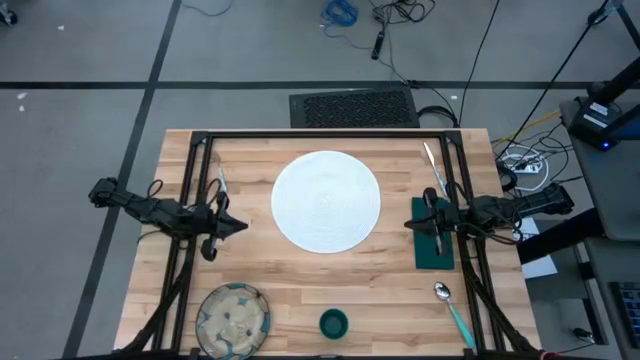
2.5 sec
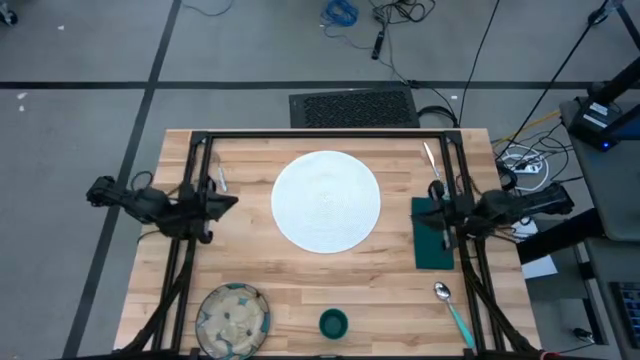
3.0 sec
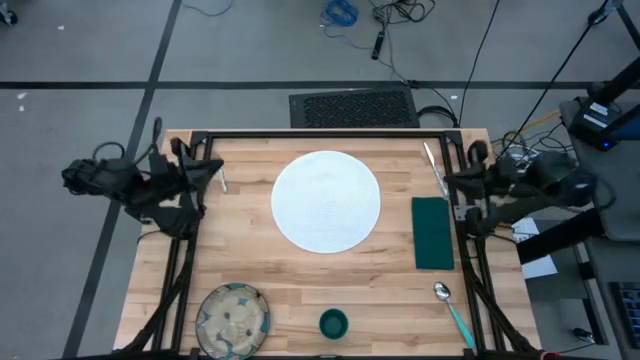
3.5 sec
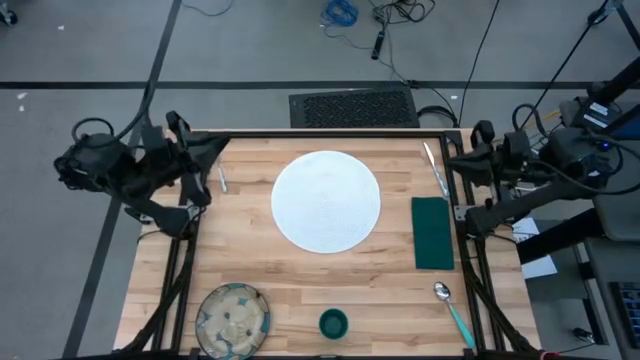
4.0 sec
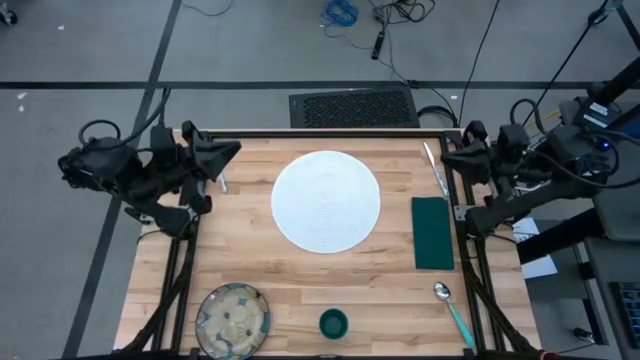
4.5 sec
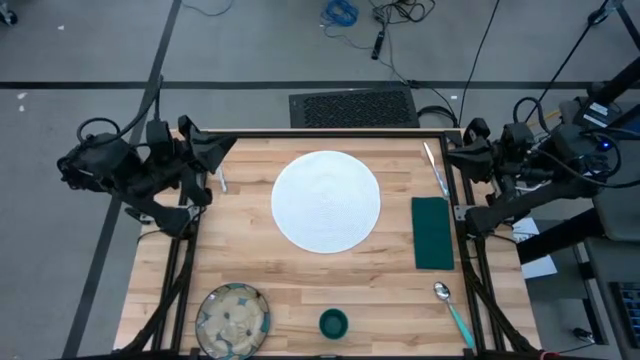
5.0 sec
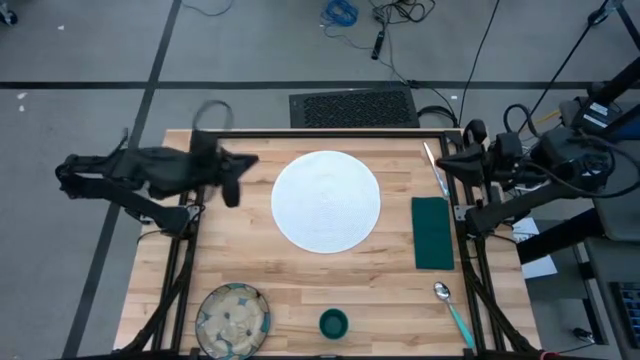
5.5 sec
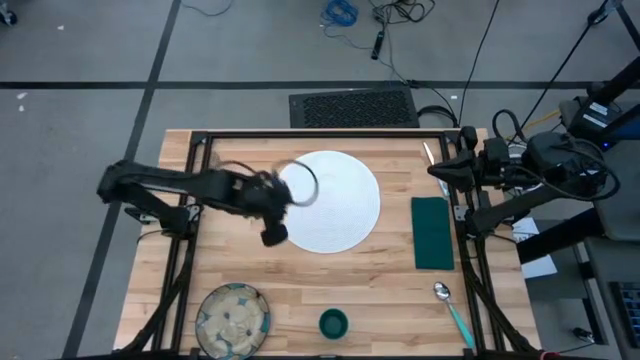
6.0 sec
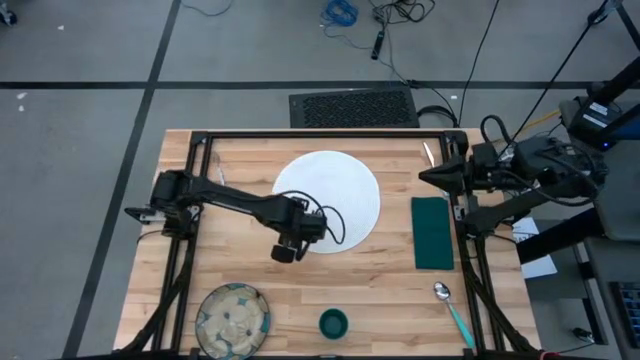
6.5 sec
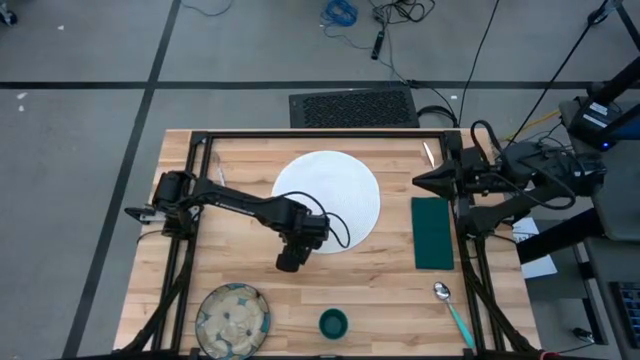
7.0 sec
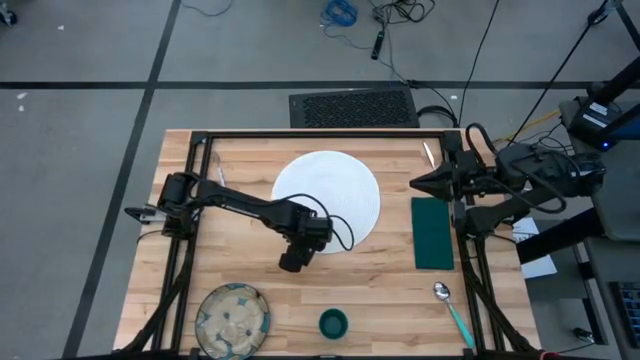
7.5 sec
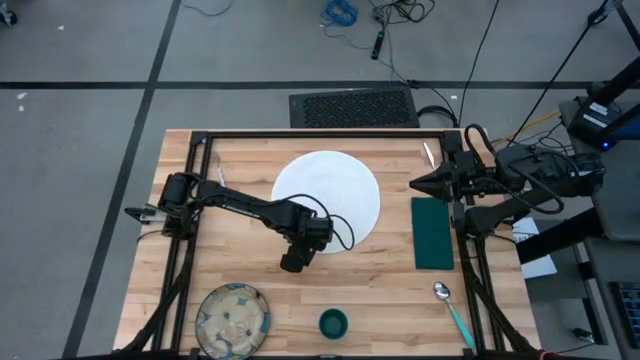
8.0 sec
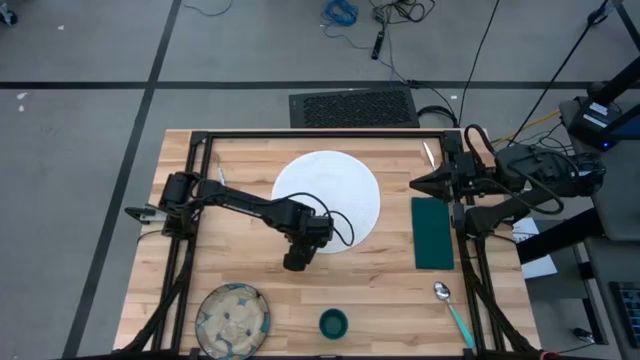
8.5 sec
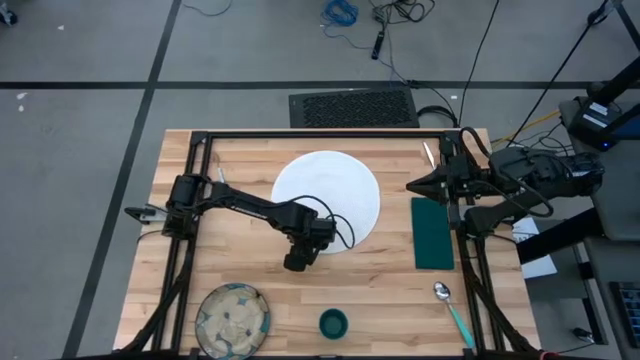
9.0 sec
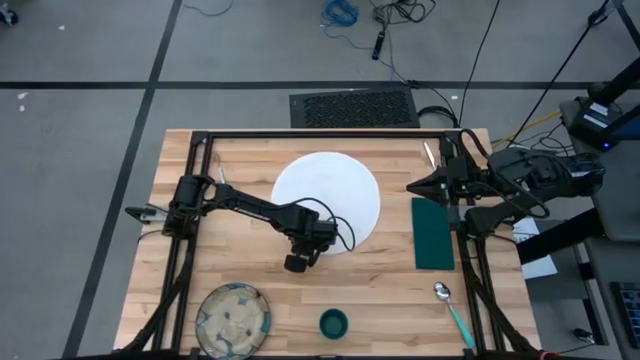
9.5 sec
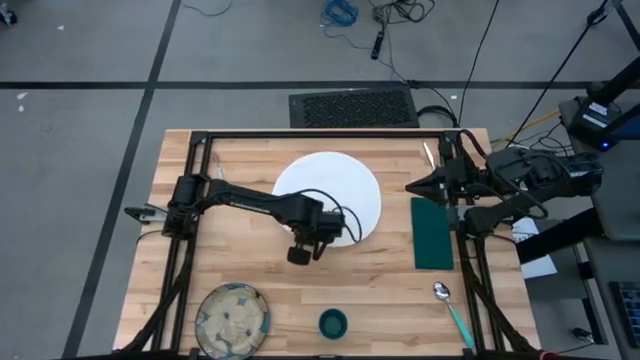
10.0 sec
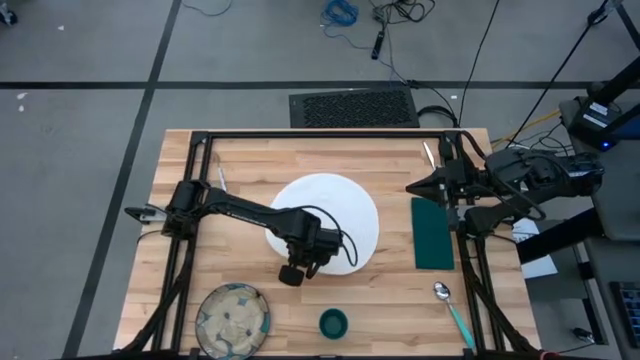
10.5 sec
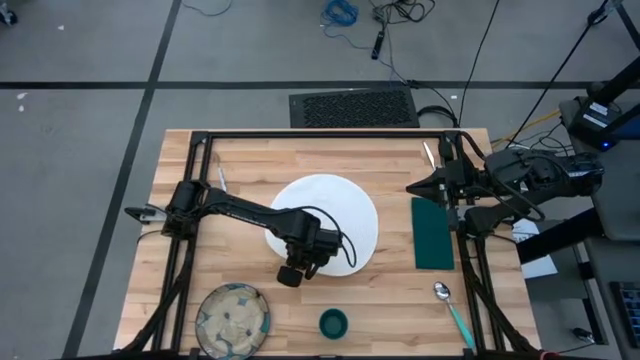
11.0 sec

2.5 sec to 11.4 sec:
Task: Set table place
Move the white placemat to the center

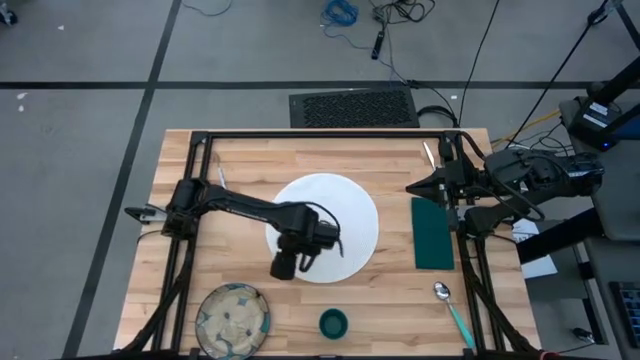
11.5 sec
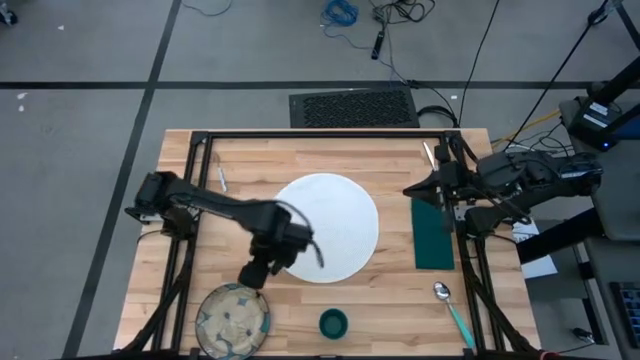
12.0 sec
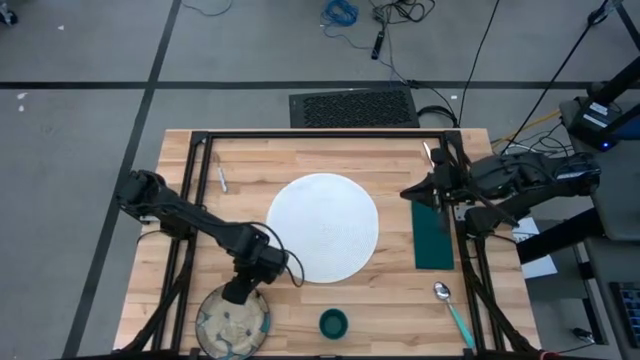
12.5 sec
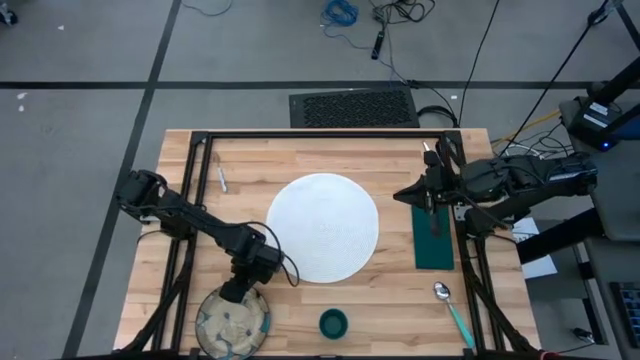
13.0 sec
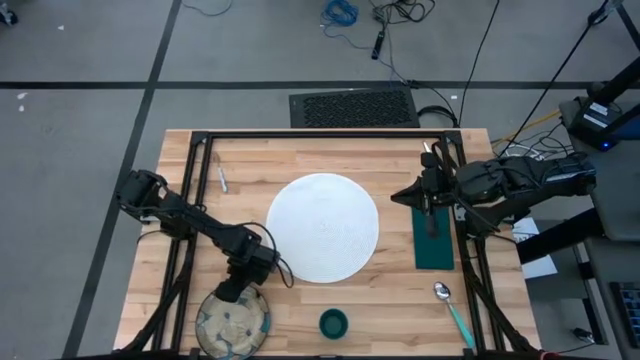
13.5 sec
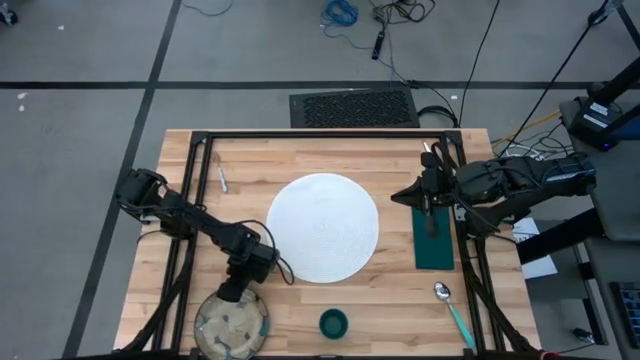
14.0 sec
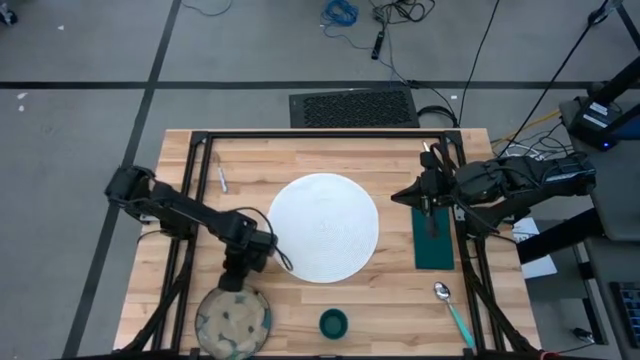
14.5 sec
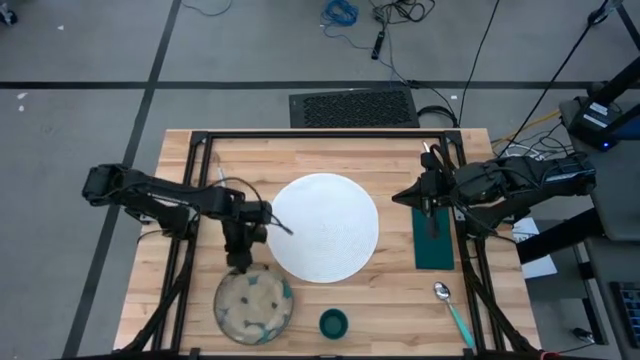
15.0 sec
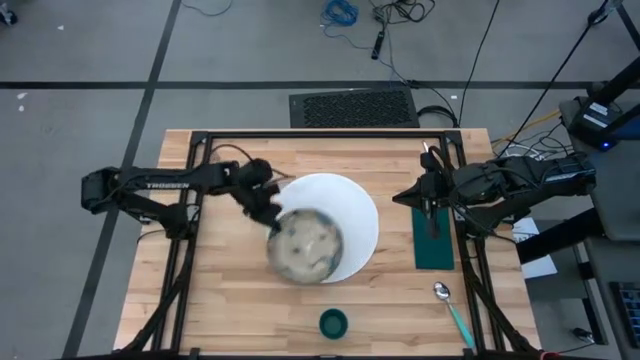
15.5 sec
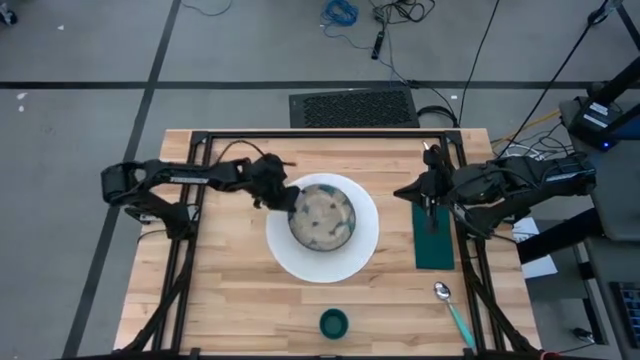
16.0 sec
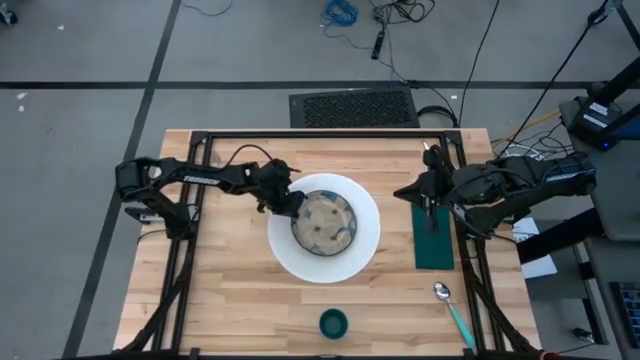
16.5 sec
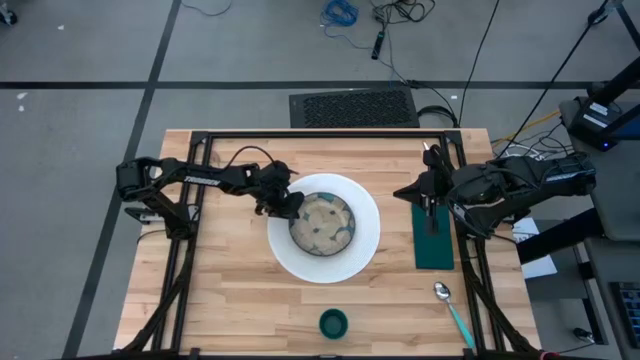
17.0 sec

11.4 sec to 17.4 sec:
Put the brown plate on the white placemat

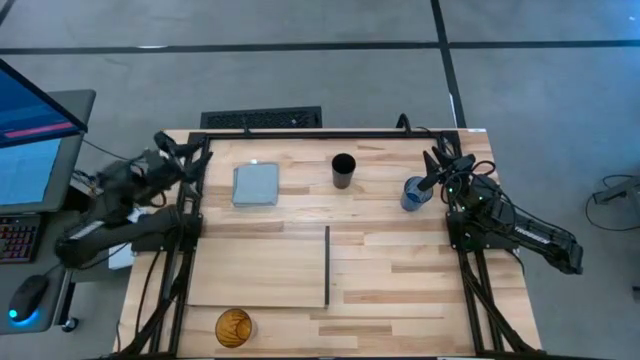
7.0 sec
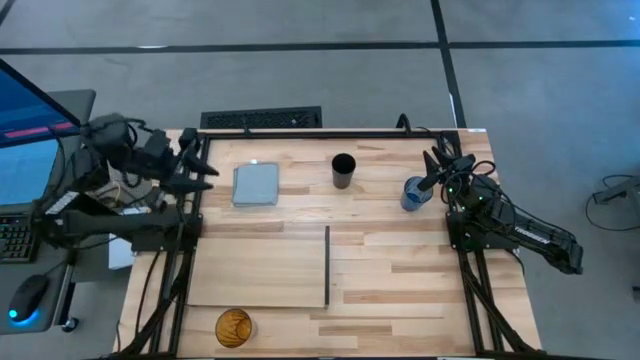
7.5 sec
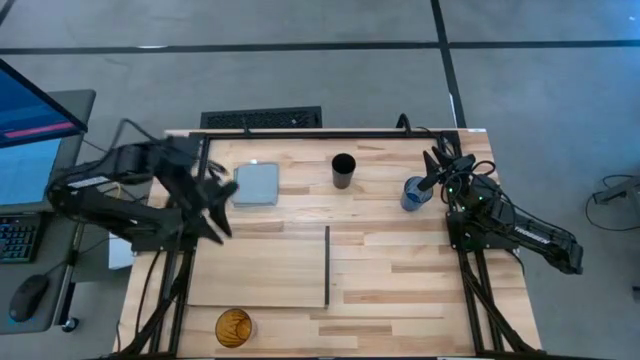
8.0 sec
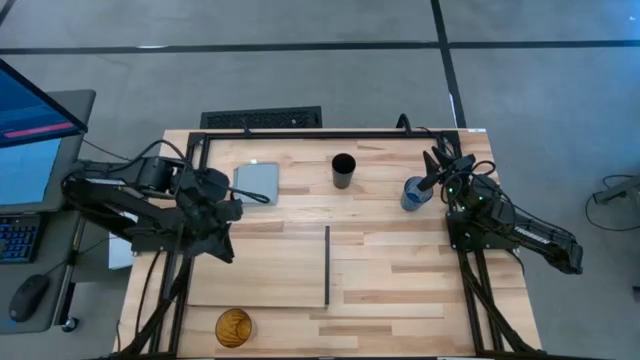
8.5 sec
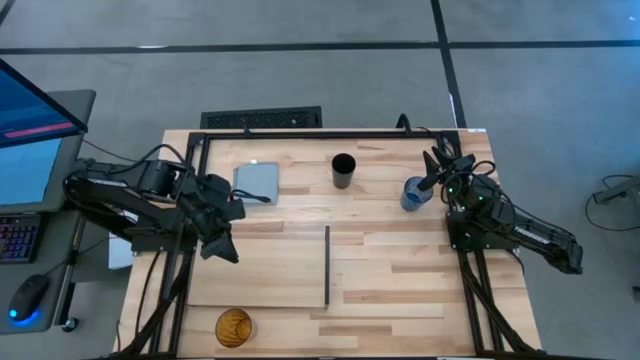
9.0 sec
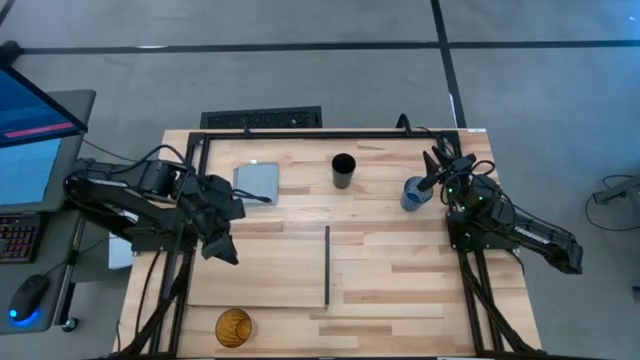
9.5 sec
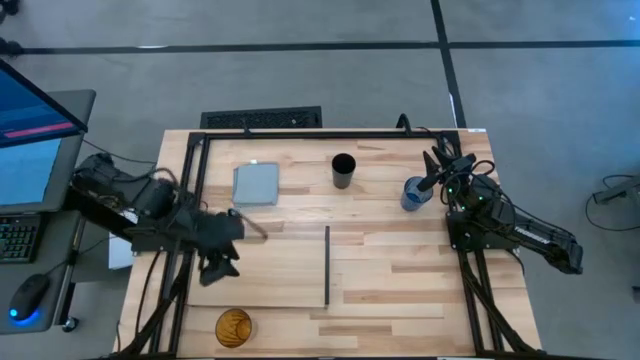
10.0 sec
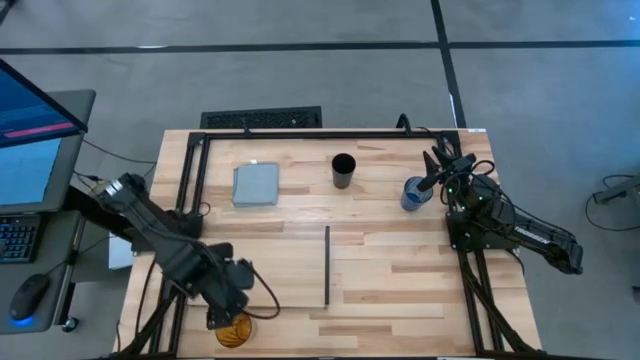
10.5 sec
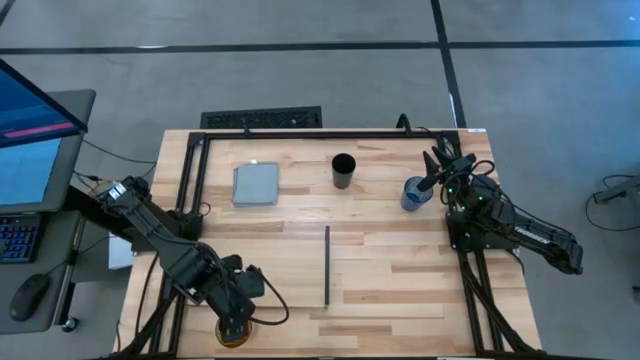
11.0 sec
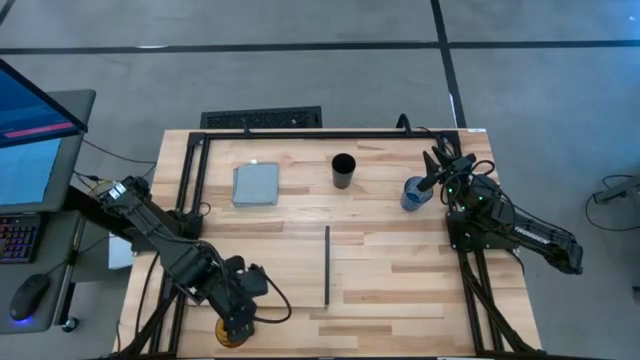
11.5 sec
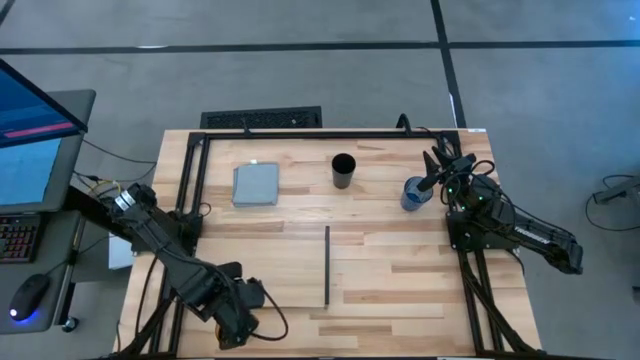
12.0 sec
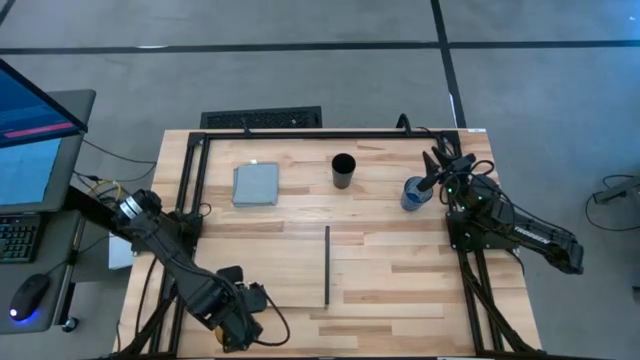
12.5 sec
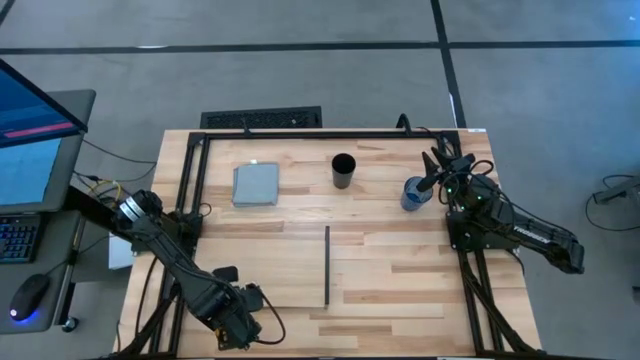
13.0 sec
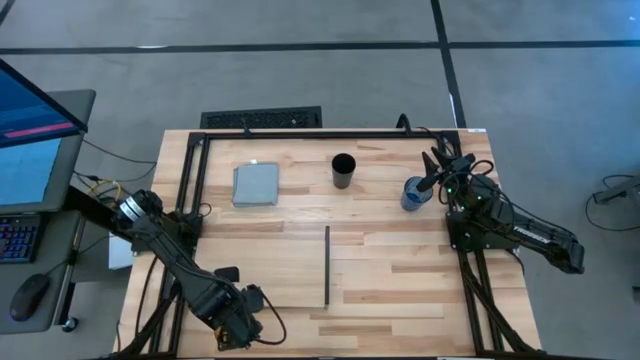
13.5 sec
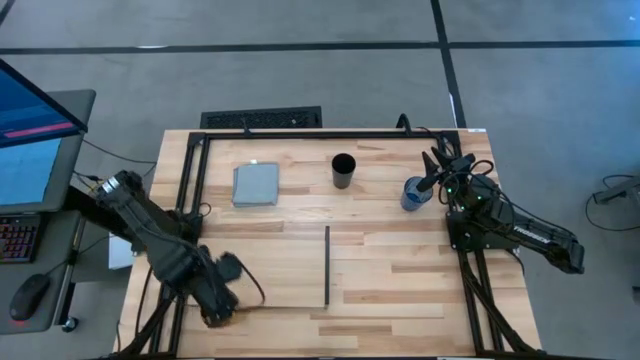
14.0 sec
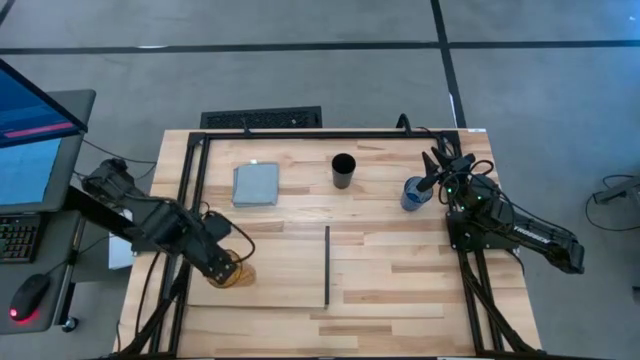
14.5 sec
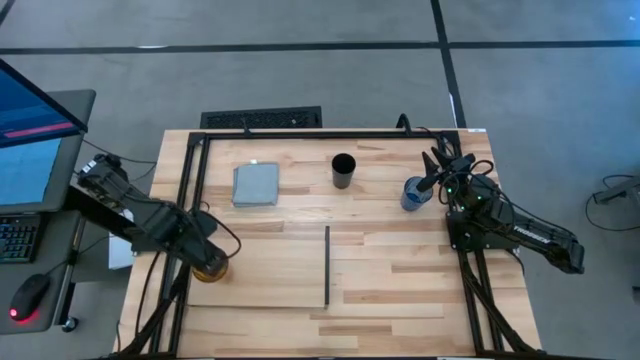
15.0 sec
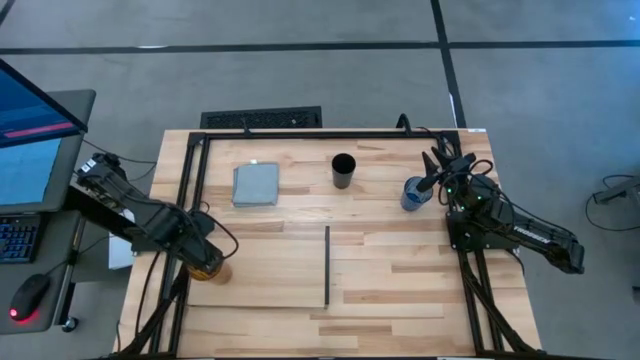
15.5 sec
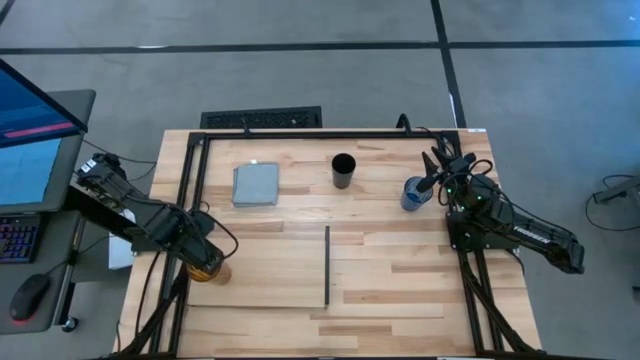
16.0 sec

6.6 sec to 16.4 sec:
Task: Stack small to large cups/mugs on shelf
Put the brown cup on the shelf
